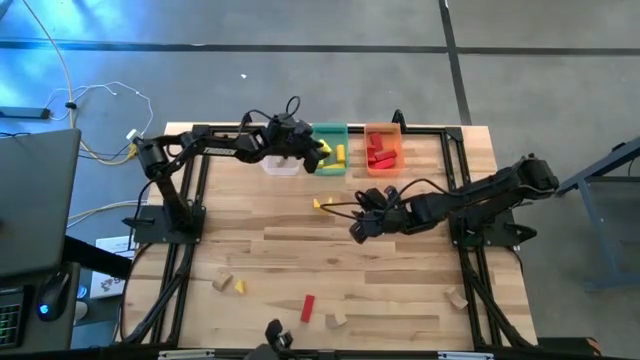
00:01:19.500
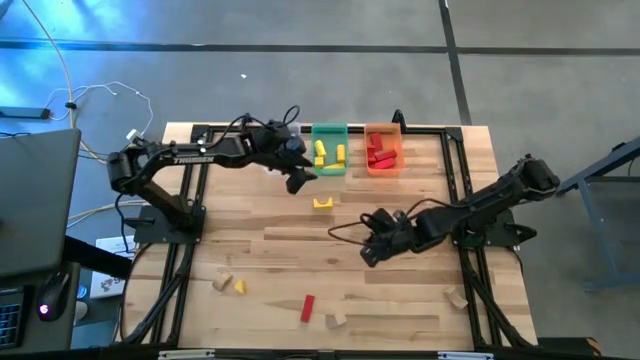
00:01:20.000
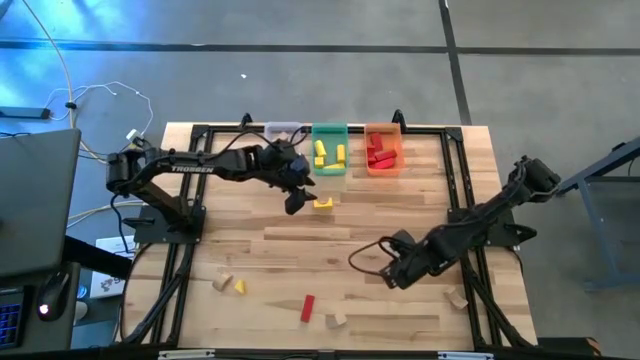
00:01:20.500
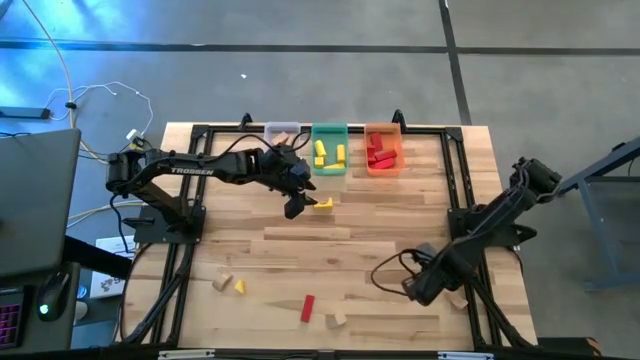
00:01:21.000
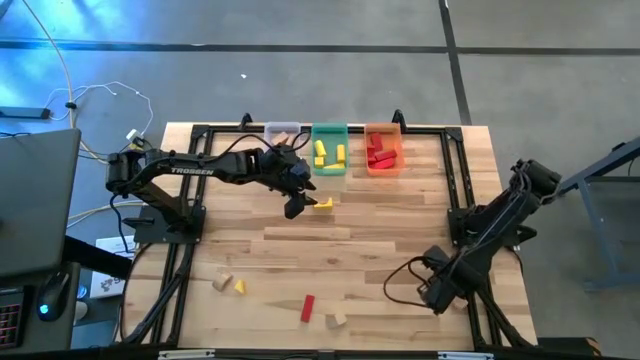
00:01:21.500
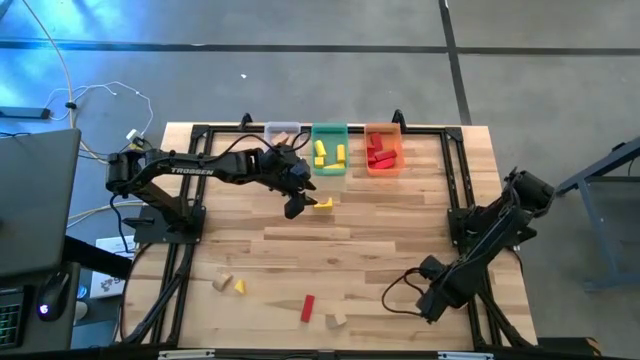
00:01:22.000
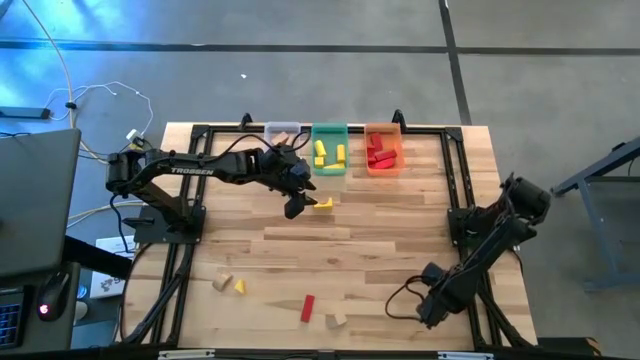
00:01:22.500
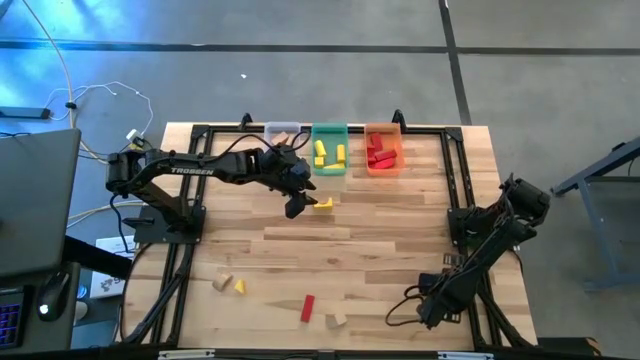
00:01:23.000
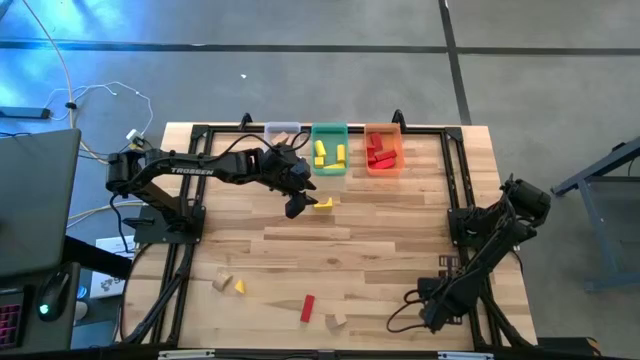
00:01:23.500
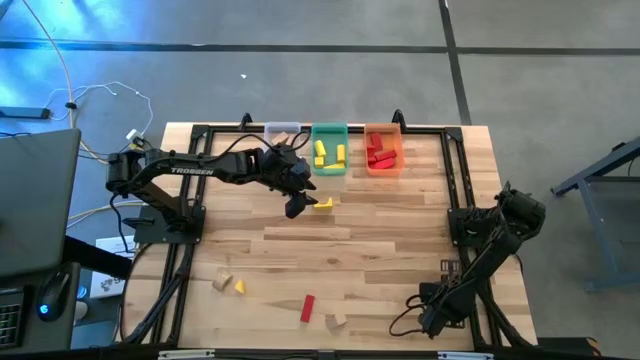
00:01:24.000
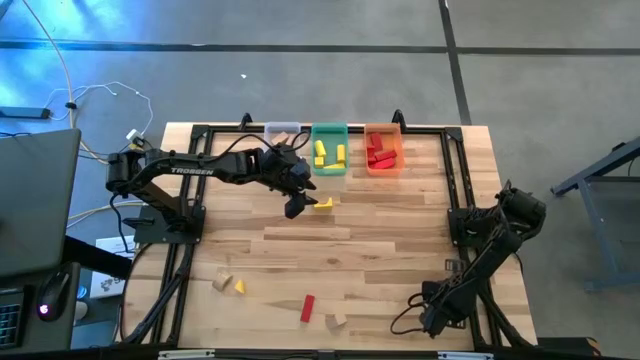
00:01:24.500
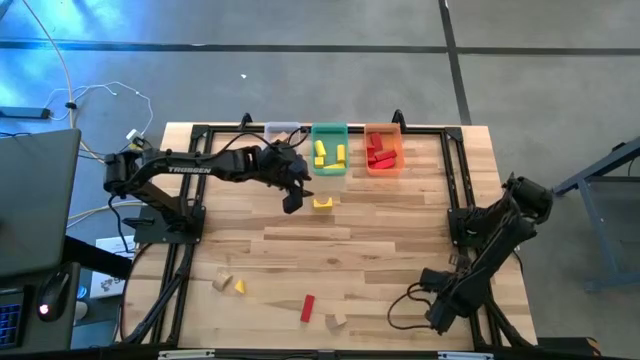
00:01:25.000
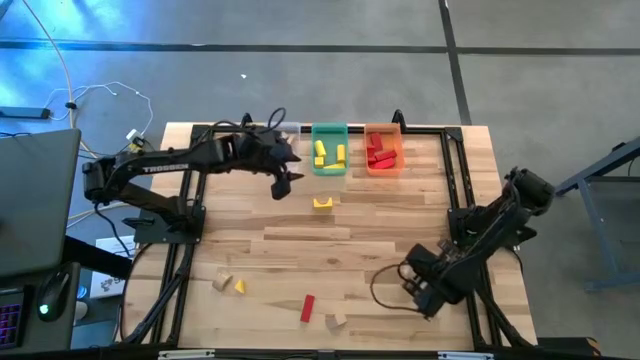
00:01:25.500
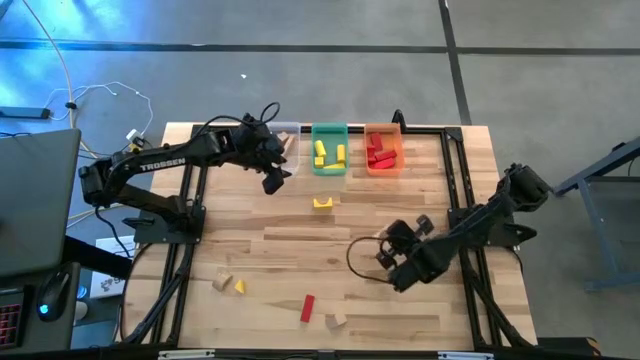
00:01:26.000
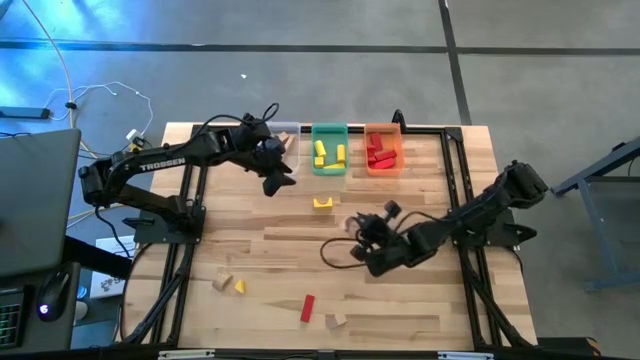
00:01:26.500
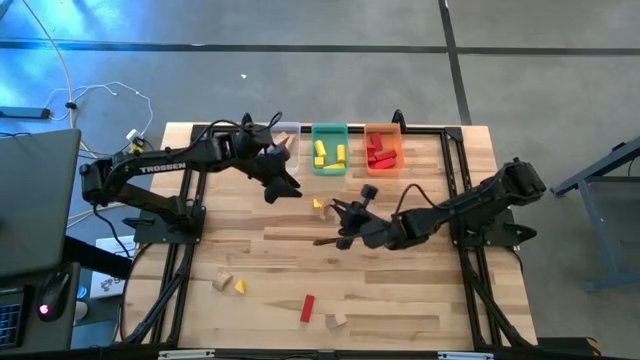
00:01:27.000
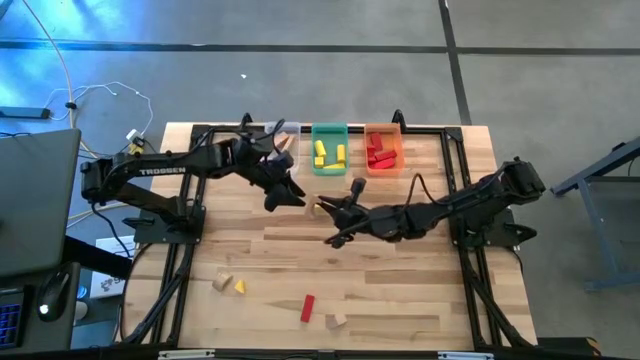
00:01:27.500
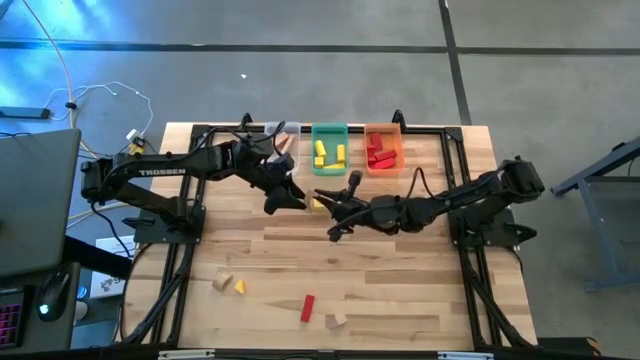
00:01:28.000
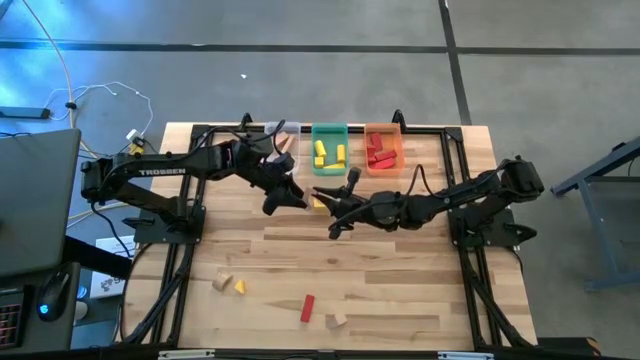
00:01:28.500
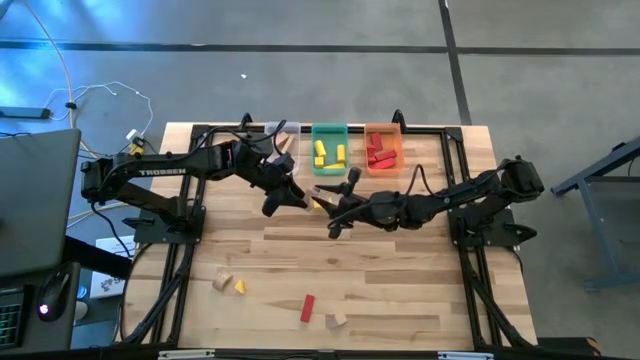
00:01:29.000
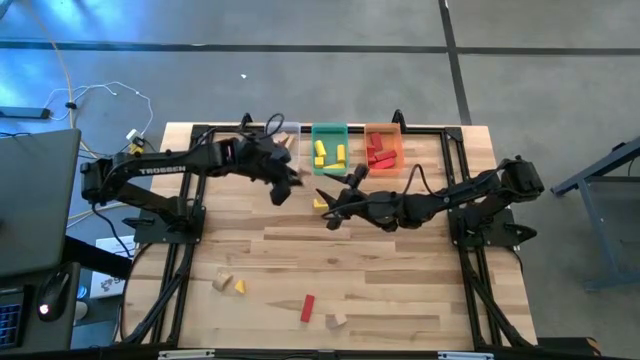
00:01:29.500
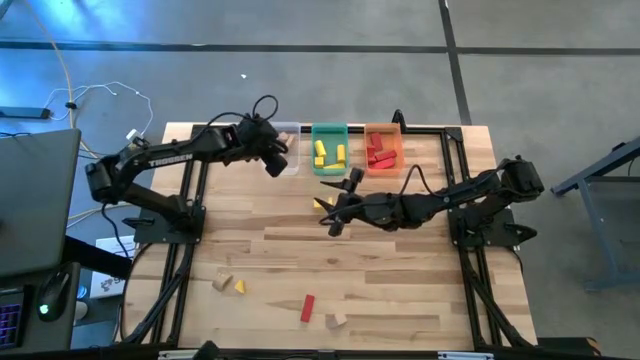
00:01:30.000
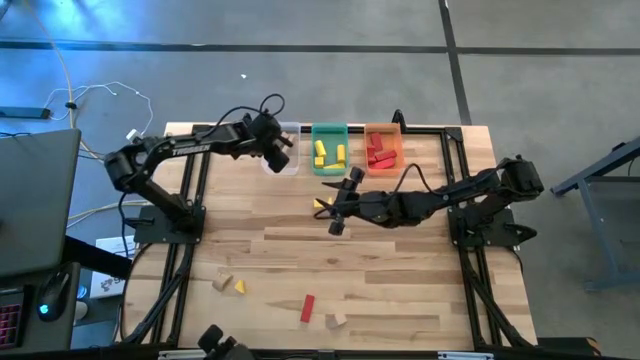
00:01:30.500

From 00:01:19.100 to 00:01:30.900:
Task: Sort & place blocks by color
Put the brown block into the white transparent bin

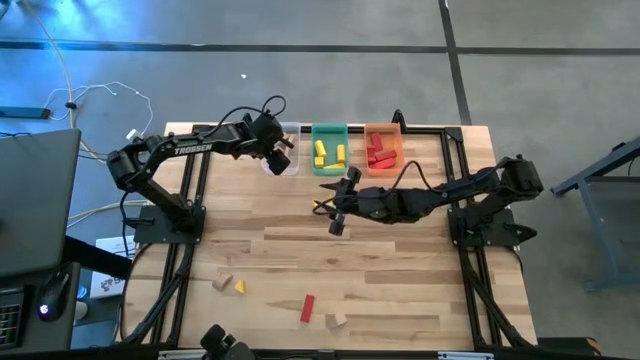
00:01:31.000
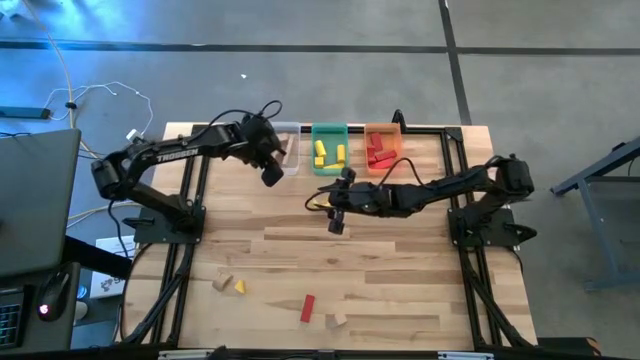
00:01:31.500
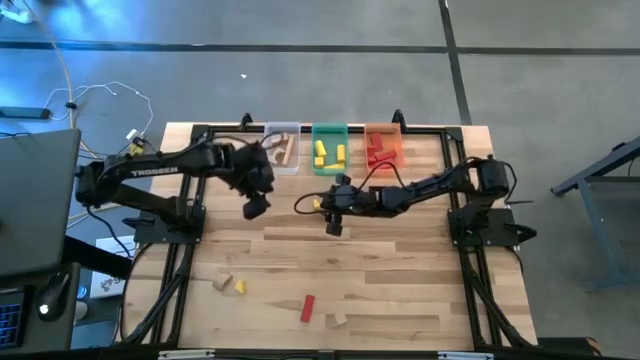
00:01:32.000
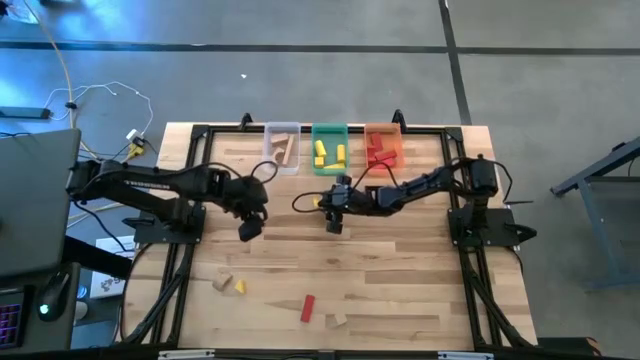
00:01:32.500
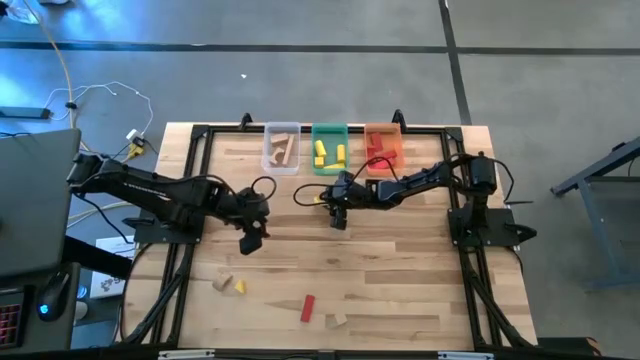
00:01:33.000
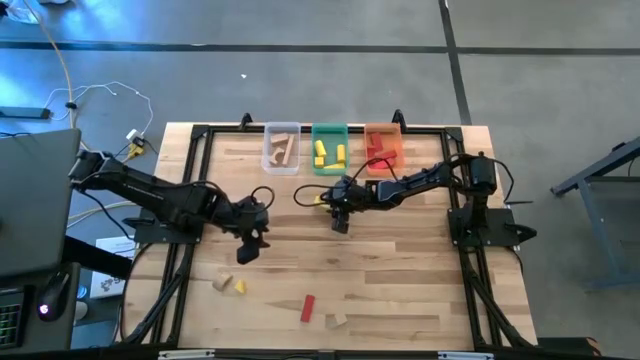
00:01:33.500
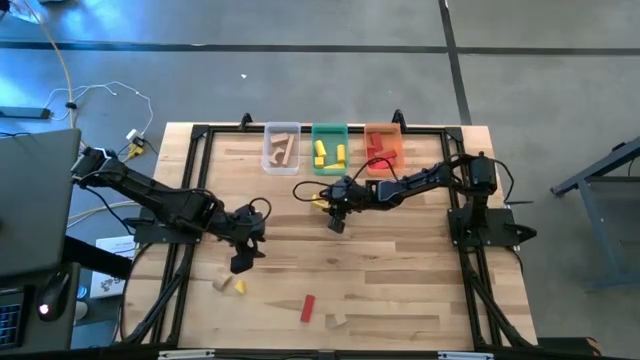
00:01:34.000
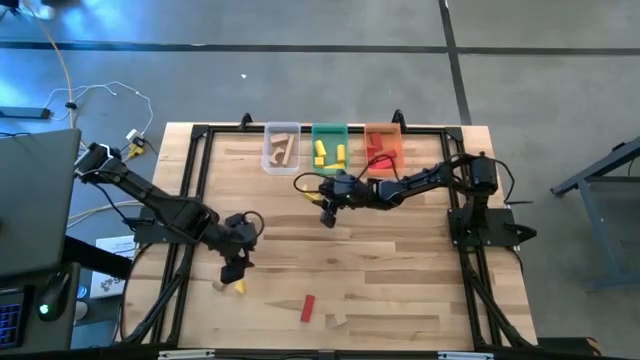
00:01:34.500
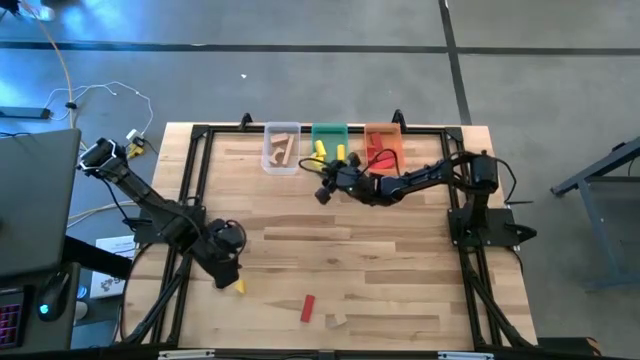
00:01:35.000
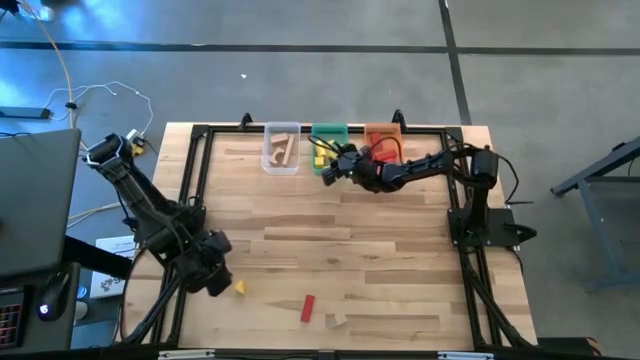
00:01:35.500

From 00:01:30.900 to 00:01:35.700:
Put the yellow block into the green transparent bin

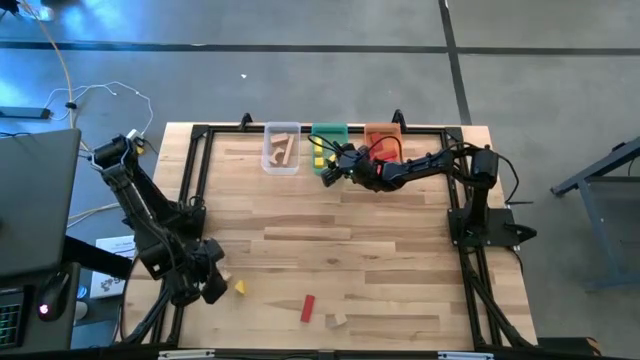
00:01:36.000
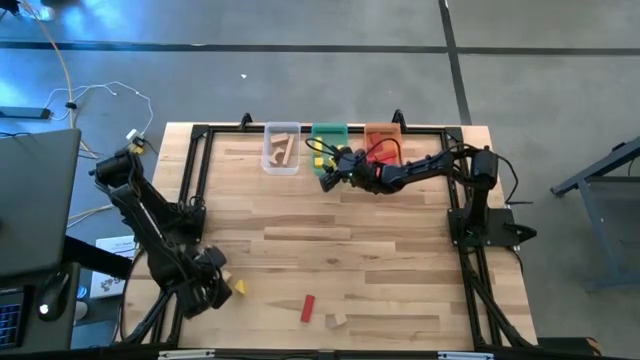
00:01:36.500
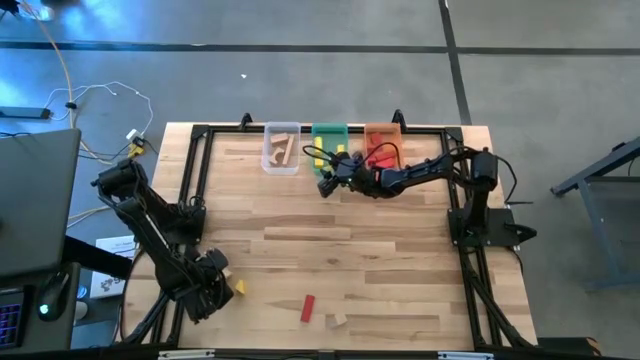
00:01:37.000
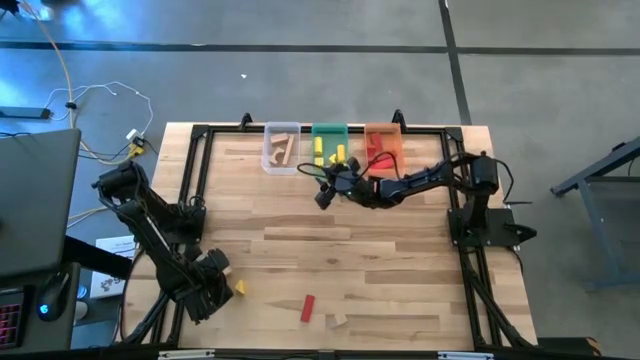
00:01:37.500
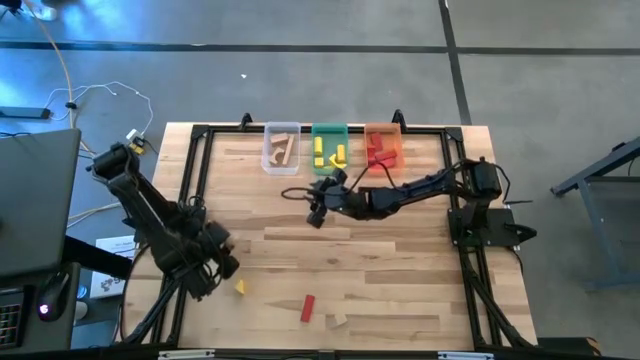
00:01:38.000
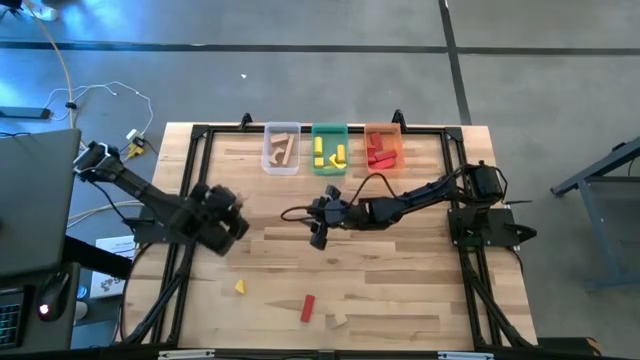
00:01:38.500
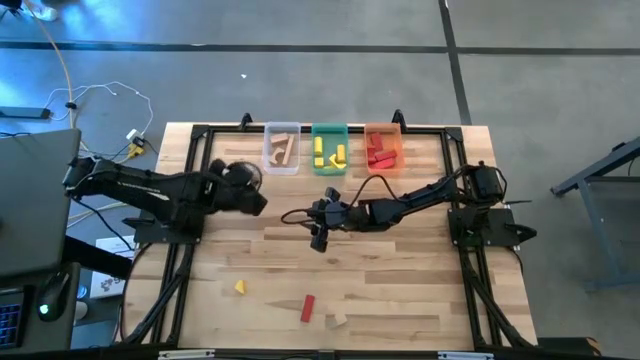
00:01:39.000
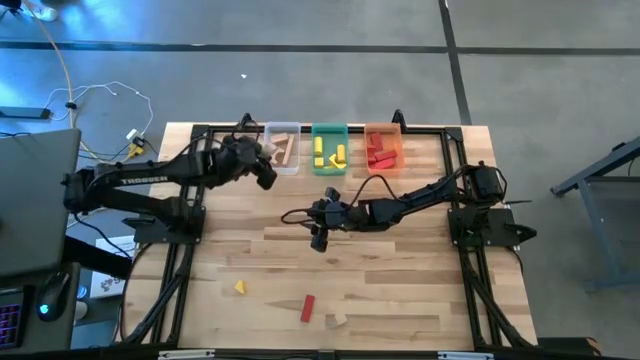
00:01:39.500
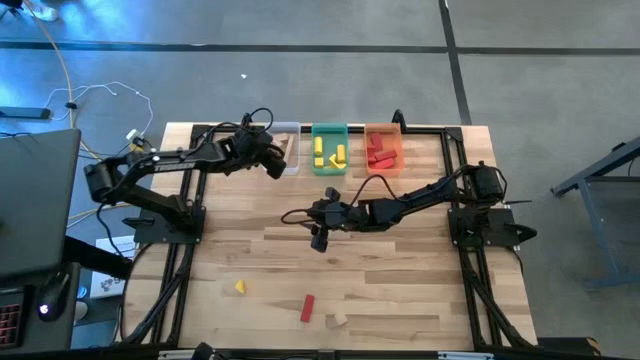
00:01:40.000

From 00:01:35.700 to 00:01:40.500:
Put the brown block into the white transparent bin

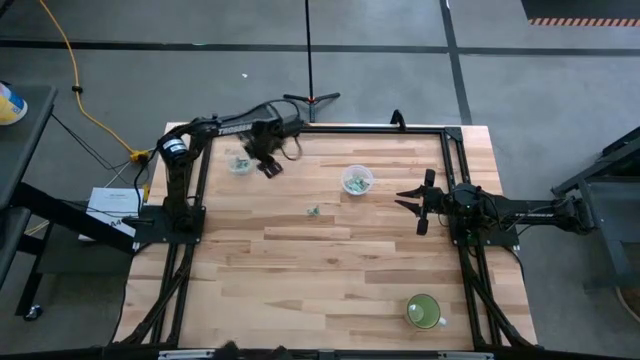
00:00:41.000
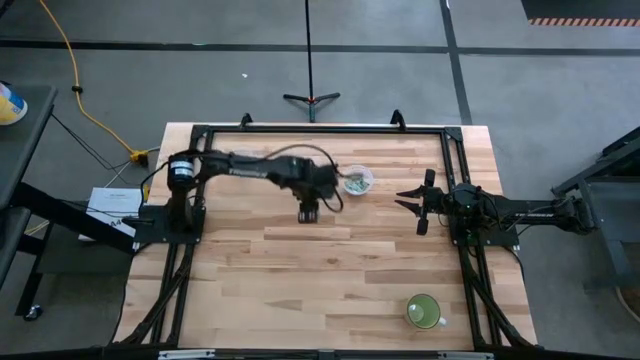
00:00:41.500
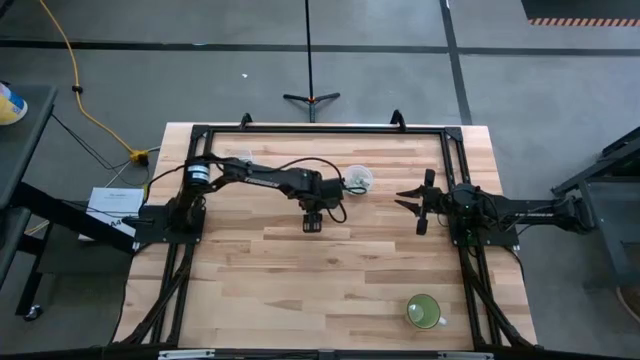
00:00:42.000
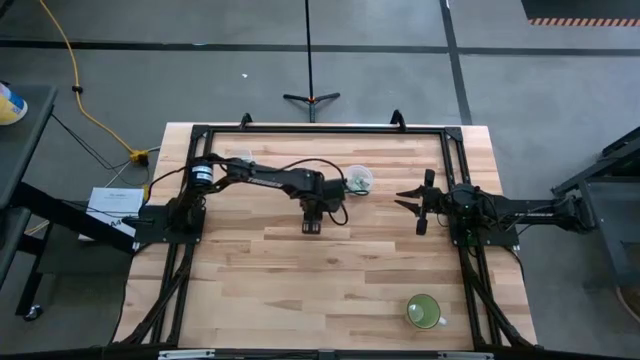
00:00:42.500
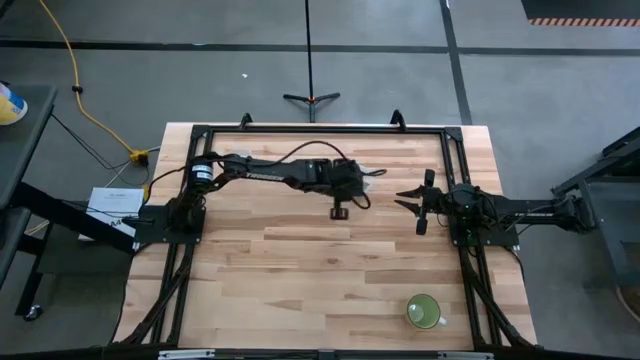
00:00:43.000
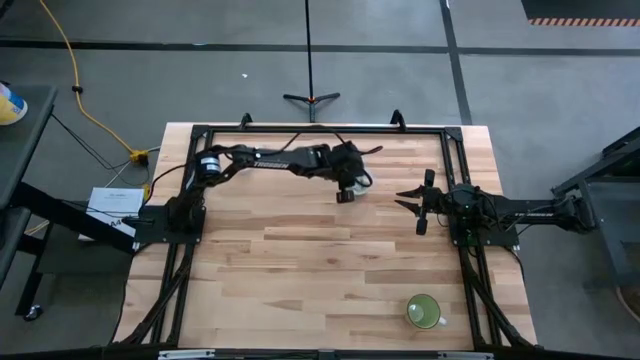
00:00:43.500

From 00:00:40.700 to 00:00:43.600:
Task: Pick and place Stevia / Truvia into bins
Put the stevia packet into the bottom transparent container
